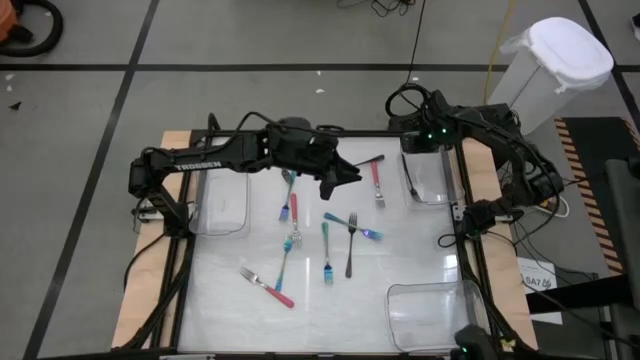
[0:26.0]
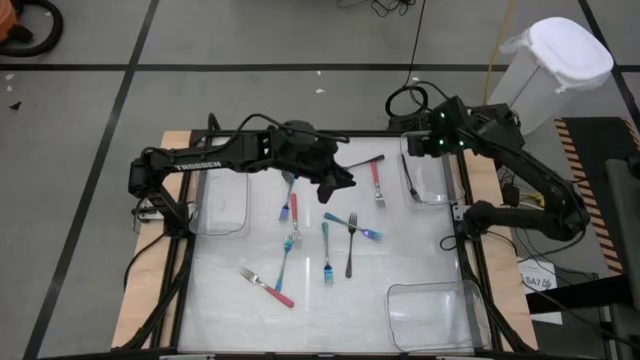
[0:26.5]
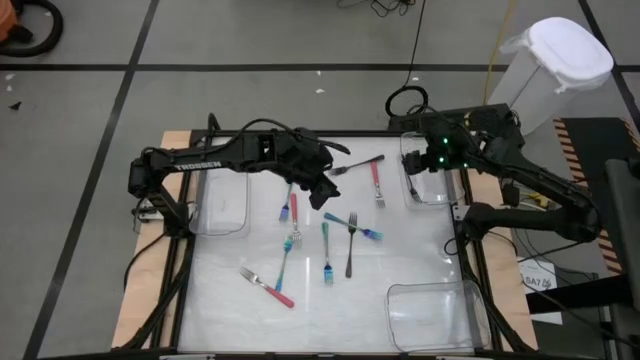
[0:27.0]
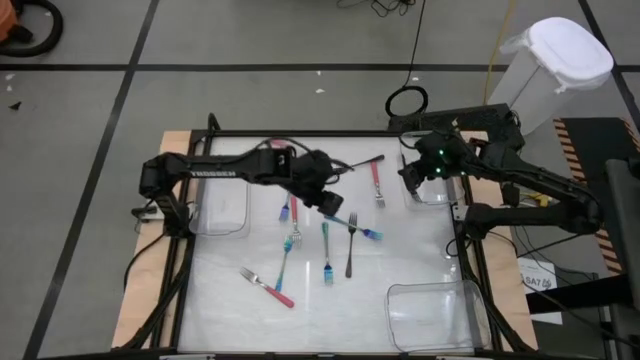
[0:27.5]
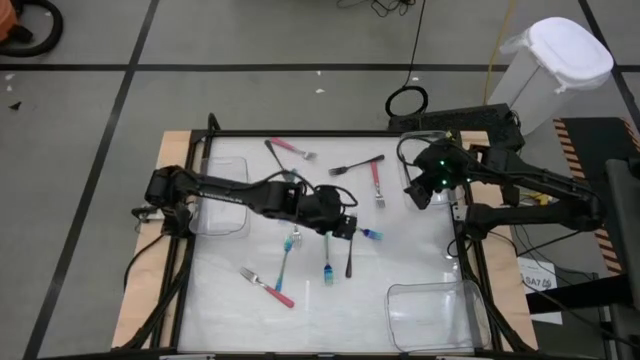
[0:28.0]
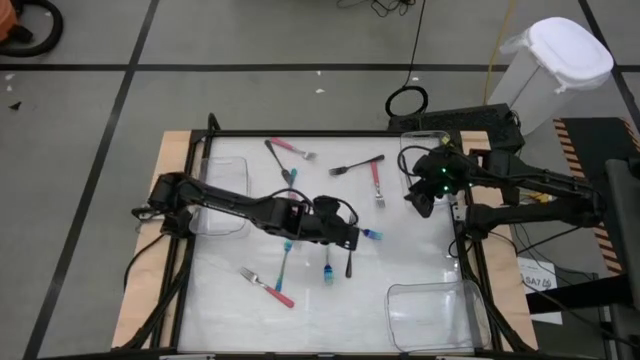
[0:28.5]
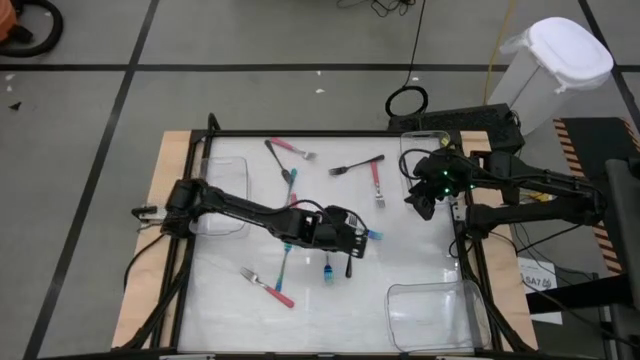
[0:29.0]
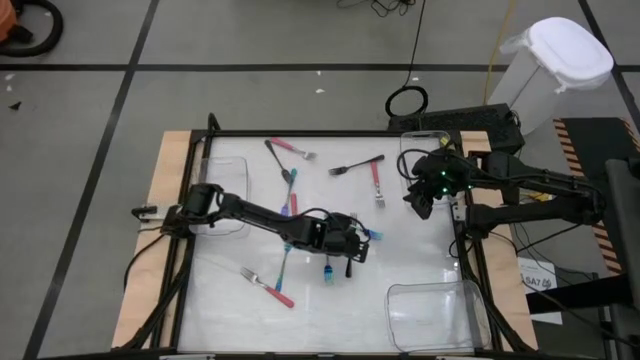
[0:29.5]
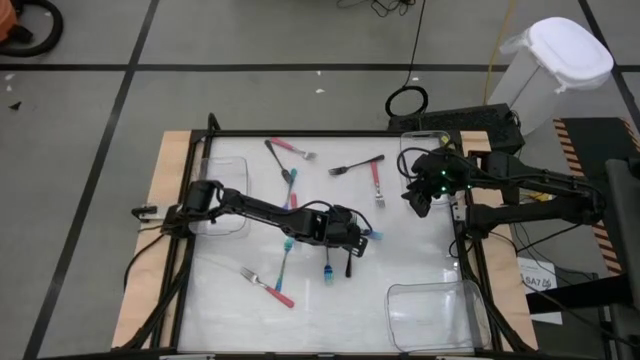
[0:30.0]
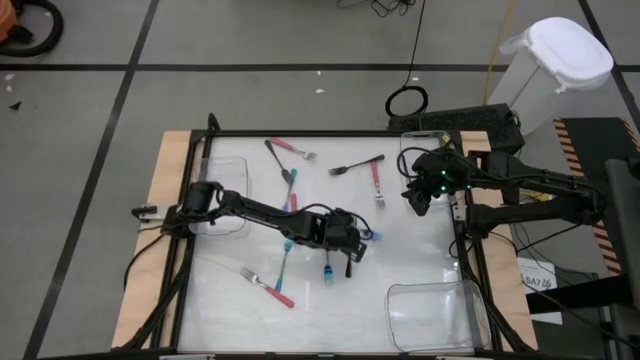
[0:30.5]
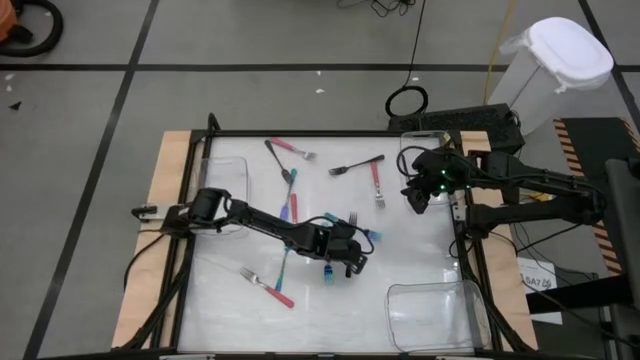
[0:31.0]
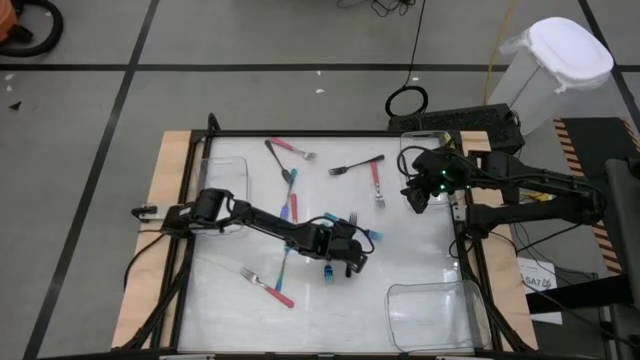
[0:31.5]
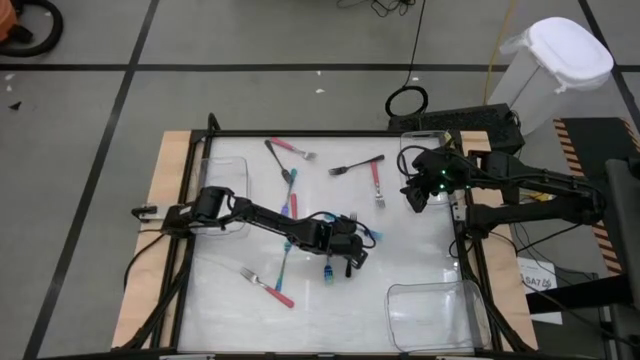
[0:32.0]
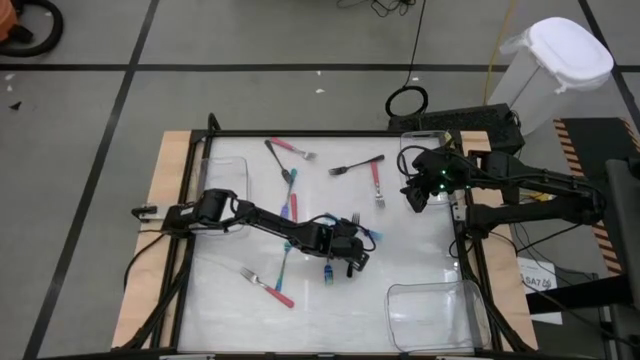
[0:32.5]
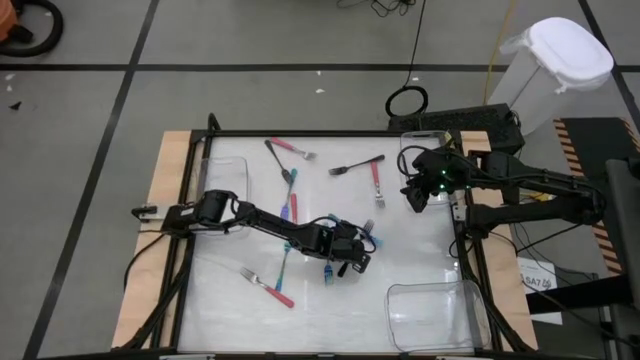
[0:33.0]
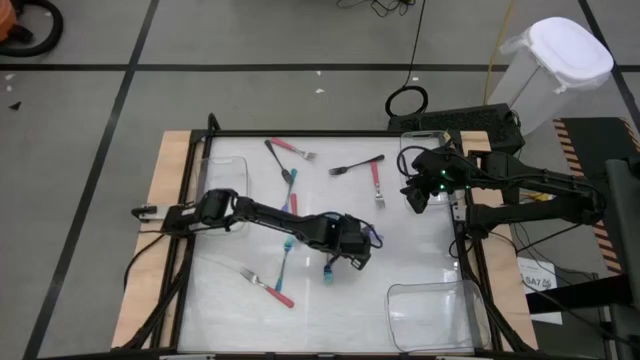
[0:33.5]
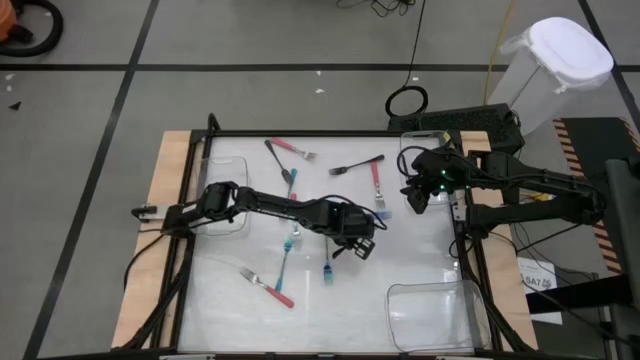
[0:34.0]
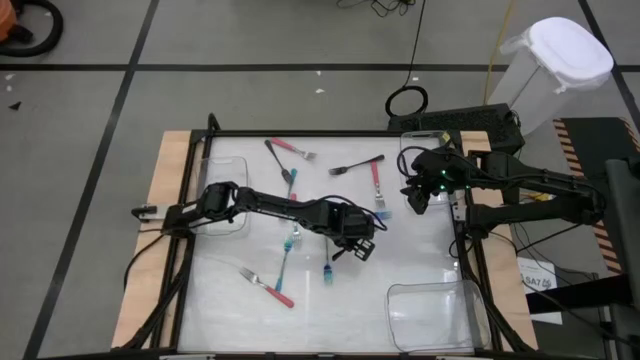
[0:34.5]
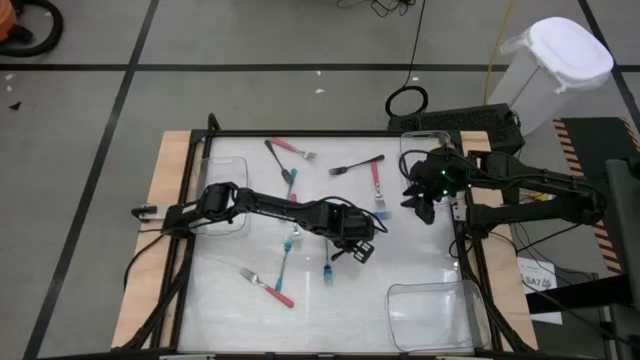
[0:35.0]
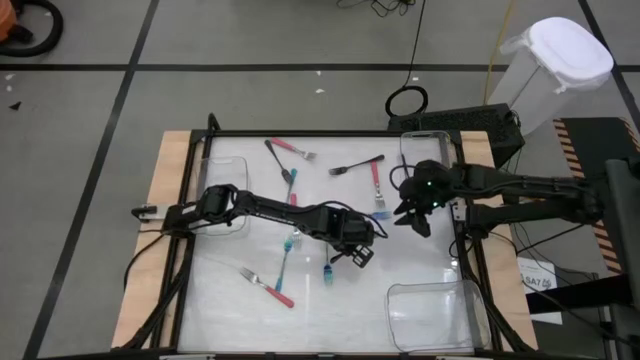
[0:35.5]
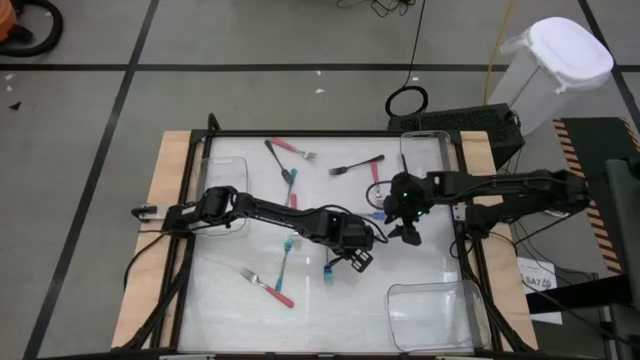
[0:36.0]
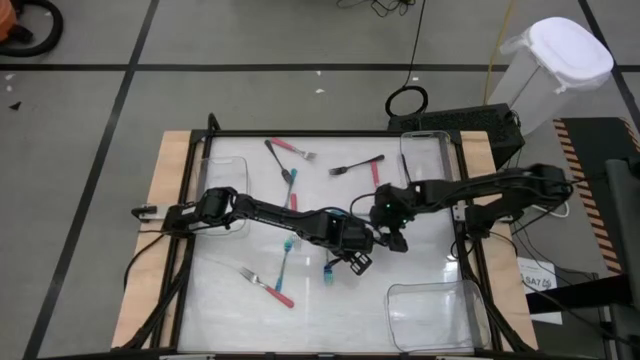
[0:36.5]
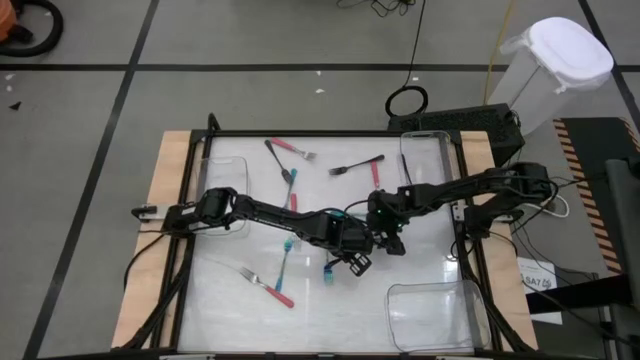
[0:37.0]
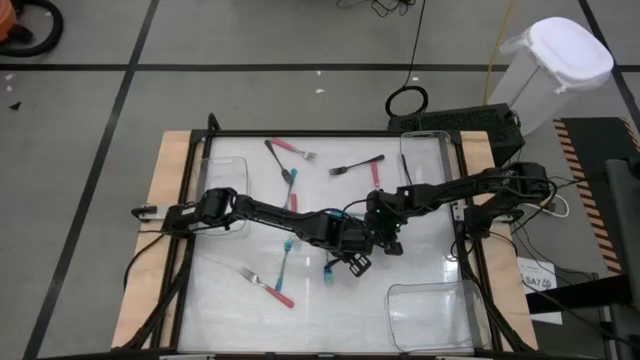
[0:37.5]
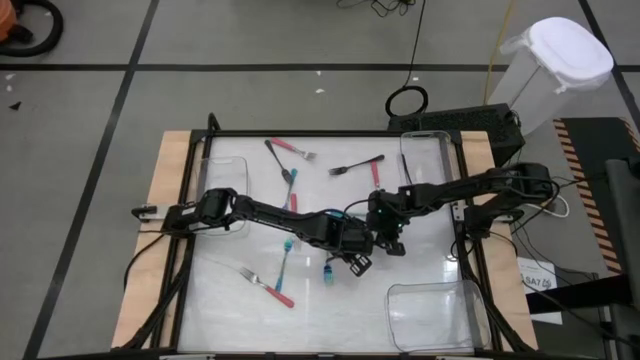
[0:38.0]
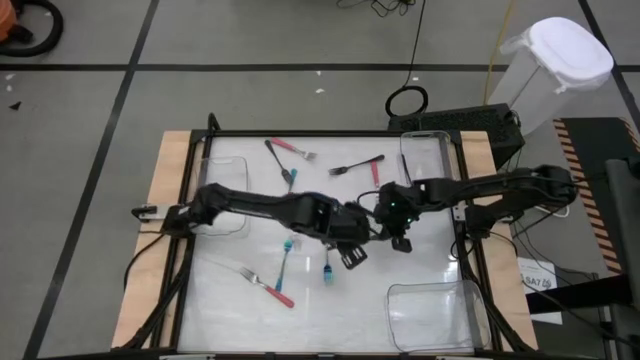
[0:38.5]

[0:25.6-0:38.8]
Task: Sort silverware by color (type)
Put the black fork into the top right transparent bin

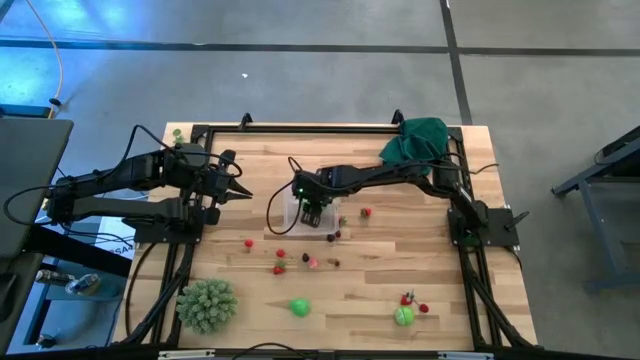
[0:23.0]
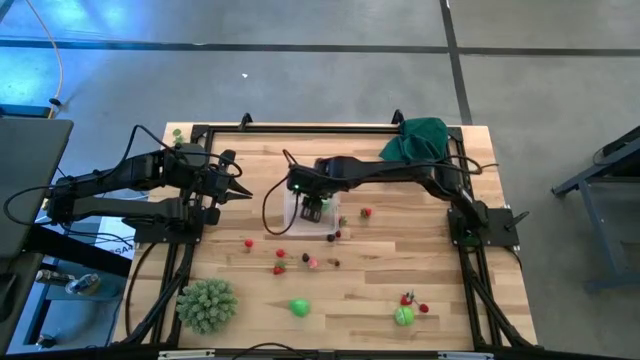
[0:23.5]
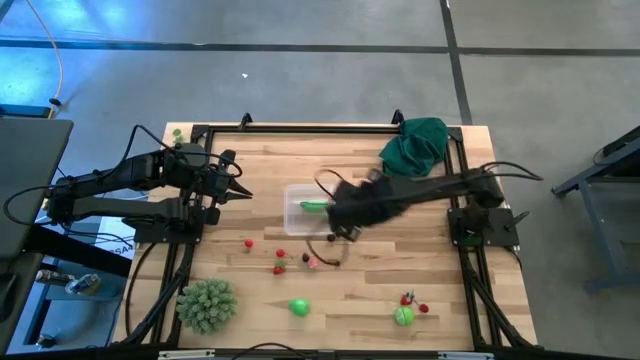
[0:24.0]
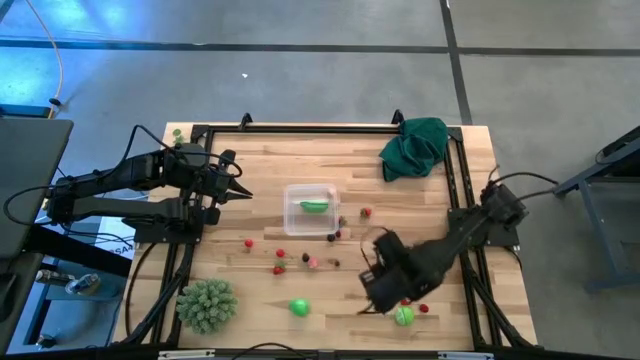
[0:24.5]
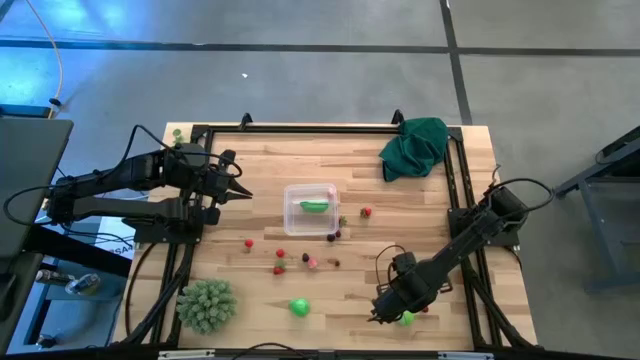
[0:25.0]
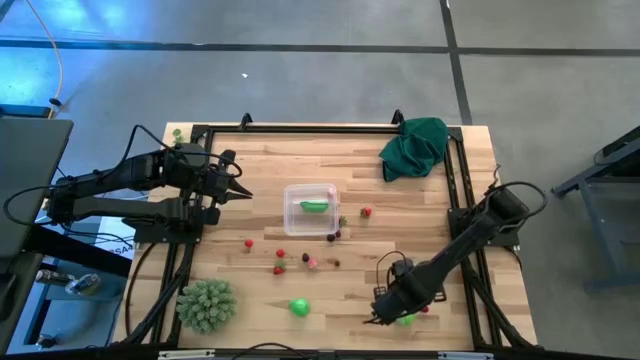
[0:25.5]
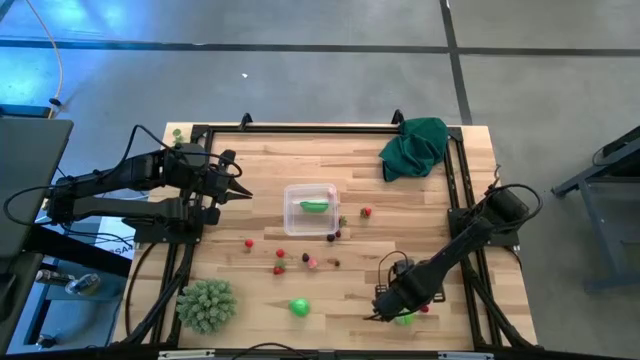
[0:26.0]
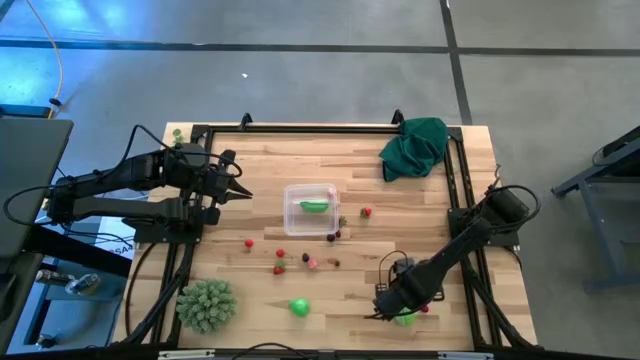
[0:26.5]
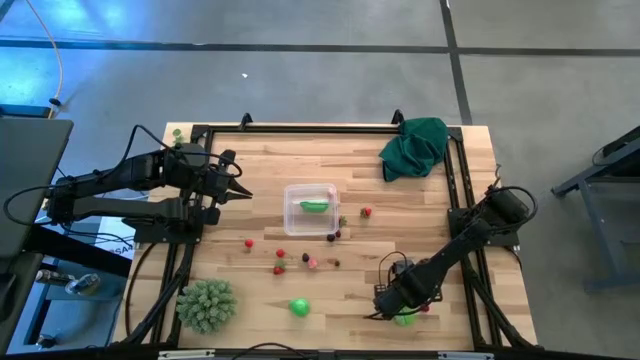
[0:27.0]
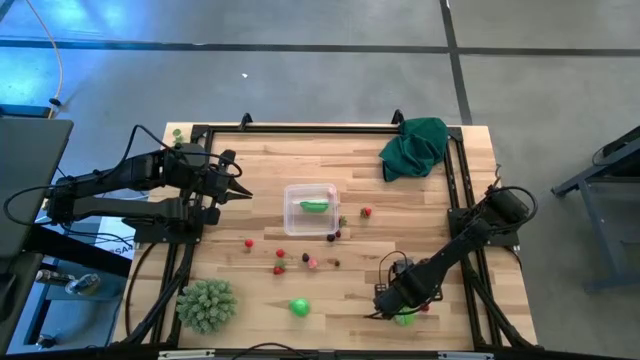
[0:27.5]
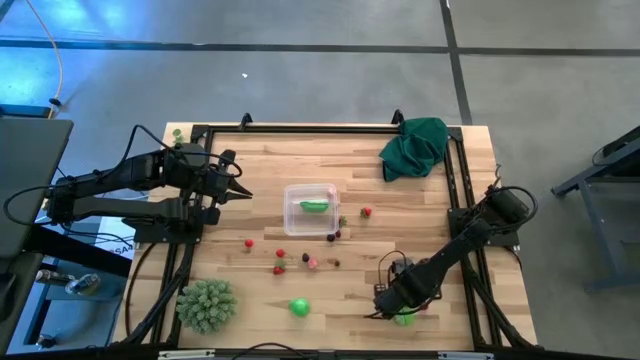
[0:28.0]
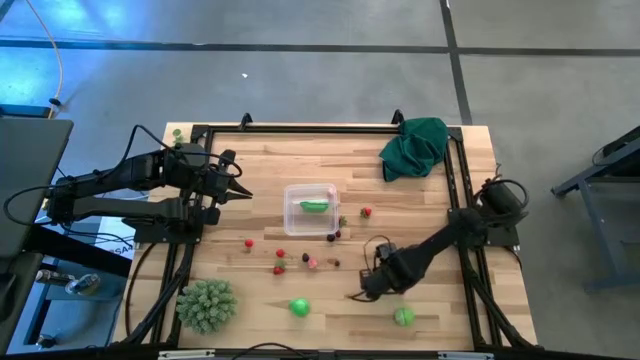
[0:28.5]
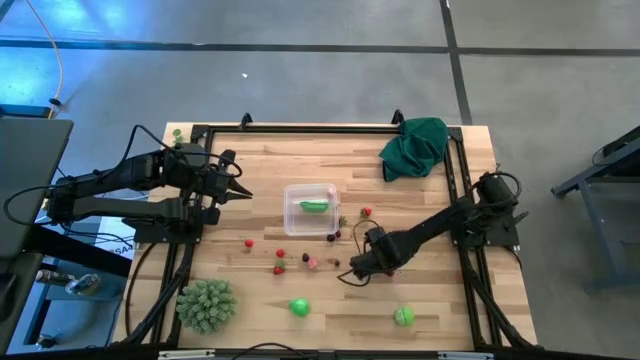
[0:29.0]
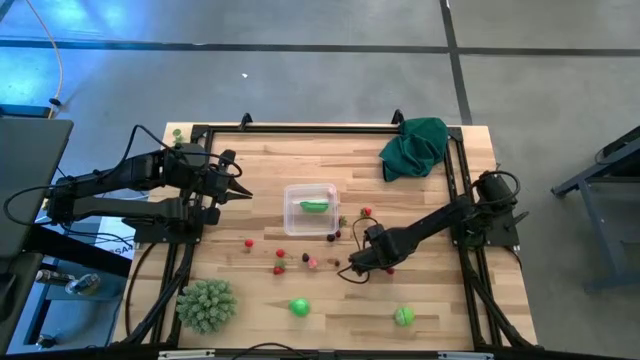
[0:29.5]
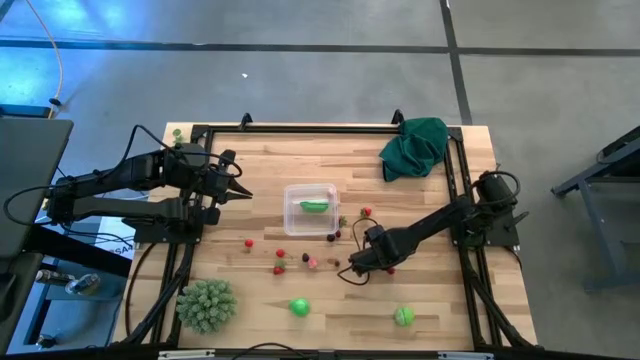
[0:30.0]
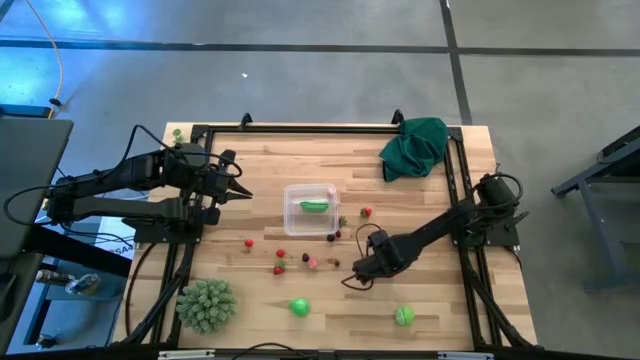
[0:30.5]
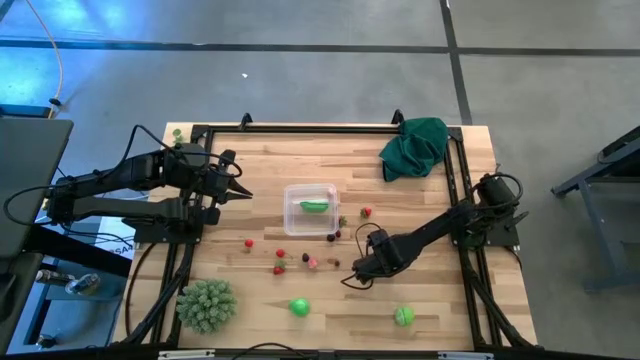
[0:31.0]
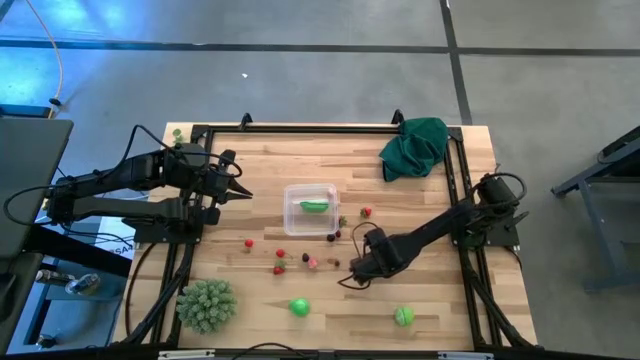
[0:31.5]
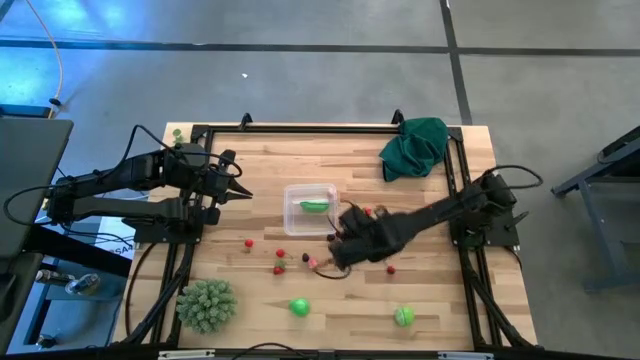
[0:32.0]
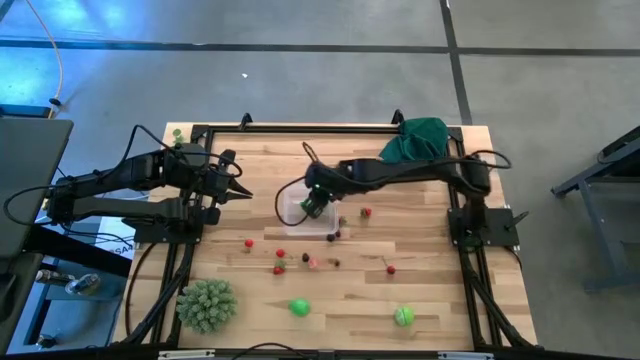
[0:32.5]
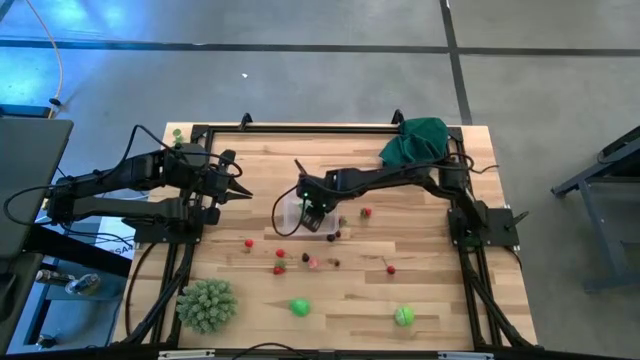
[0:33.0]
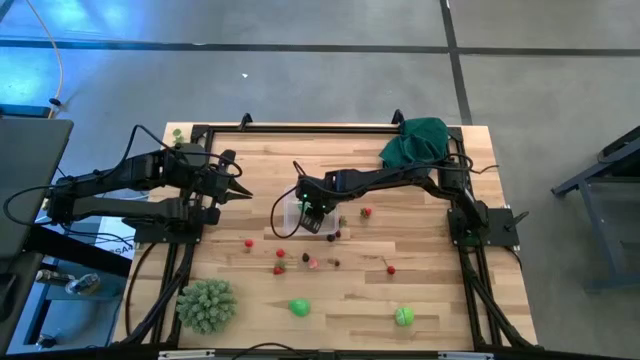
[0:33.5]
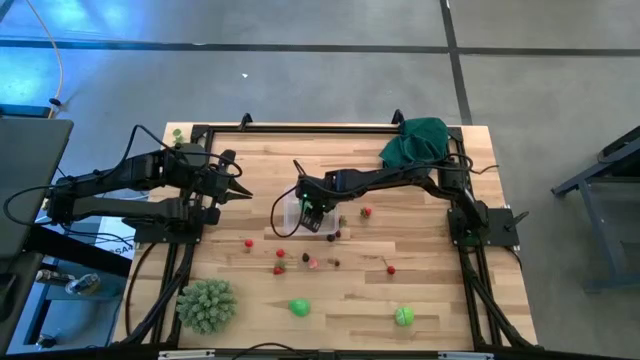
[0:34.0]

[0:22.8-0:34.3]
Task: Pick and placing Produce into tupperware
Put the red strawberry into the transparent container
